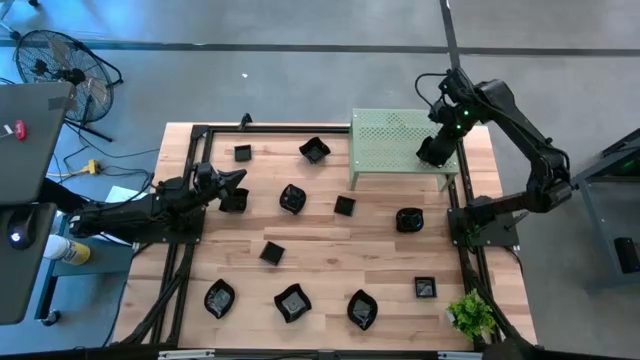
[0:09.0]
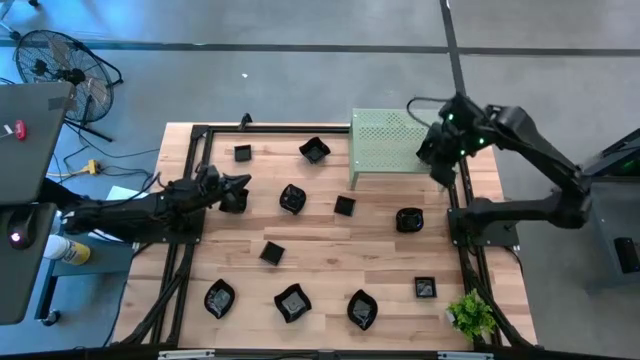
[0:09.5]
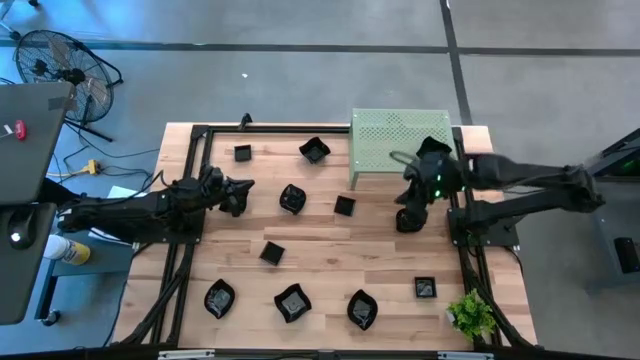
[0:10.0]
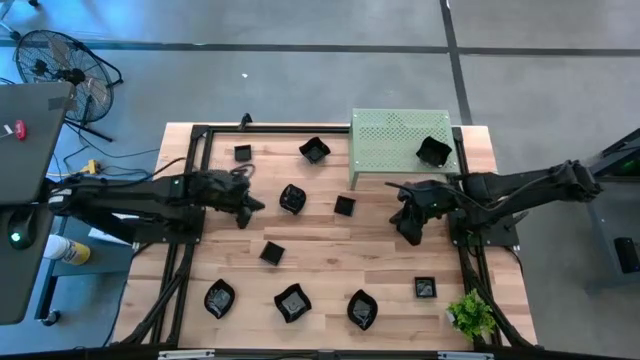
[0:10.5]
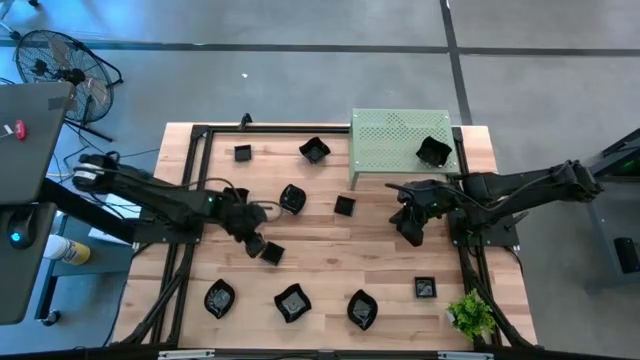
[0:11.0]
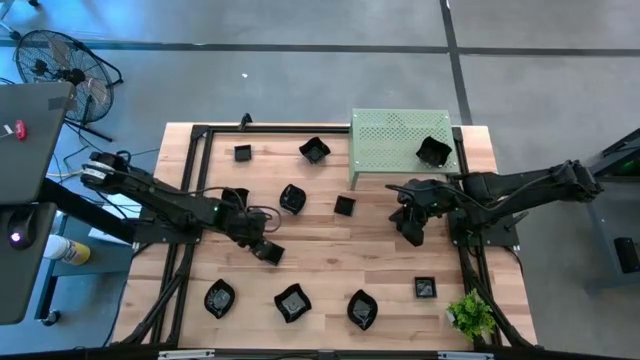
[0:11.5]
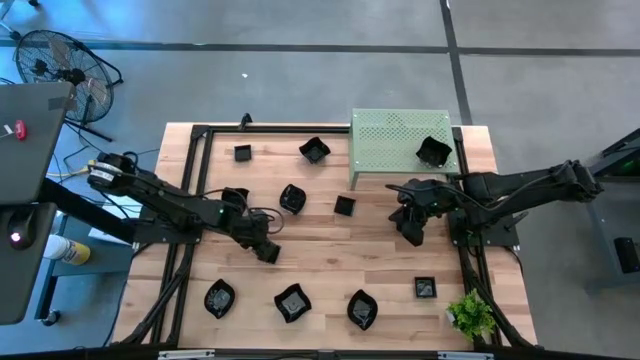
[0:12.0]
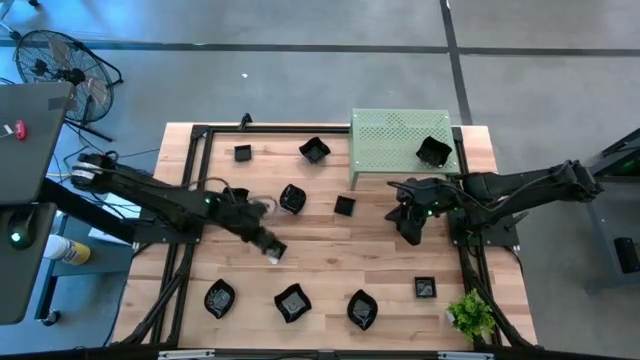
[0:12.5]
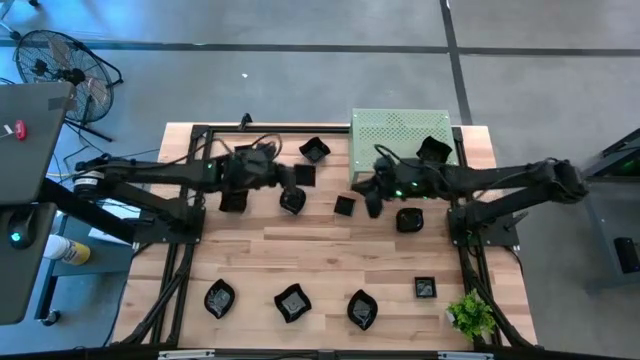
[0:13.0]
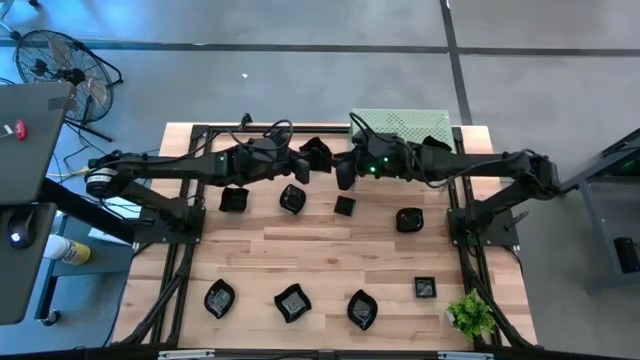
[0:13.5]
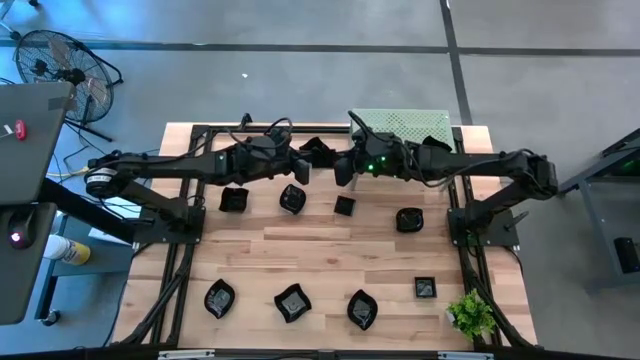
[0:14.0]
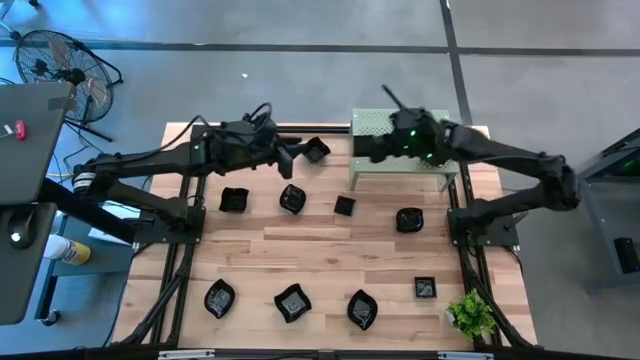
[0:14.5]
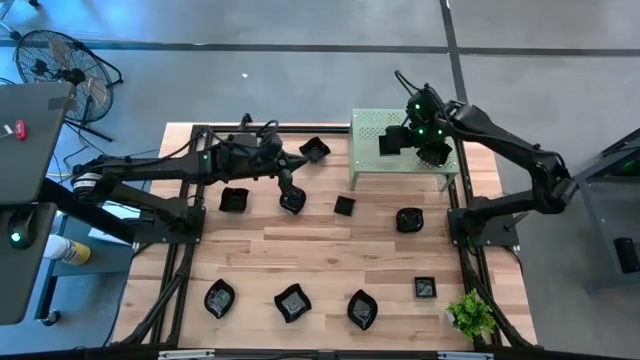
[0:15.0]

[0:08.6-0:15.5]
Task: Pick & Place Mini shaped plates
Put the black square plate on the shelf

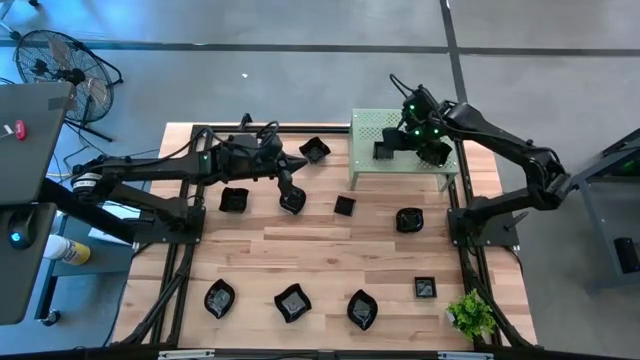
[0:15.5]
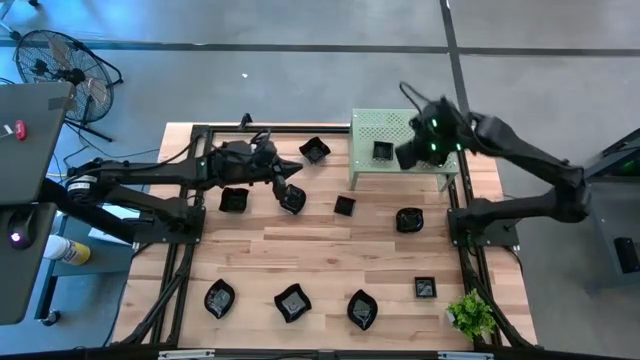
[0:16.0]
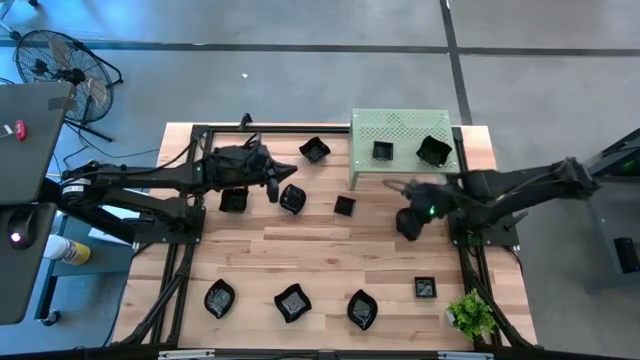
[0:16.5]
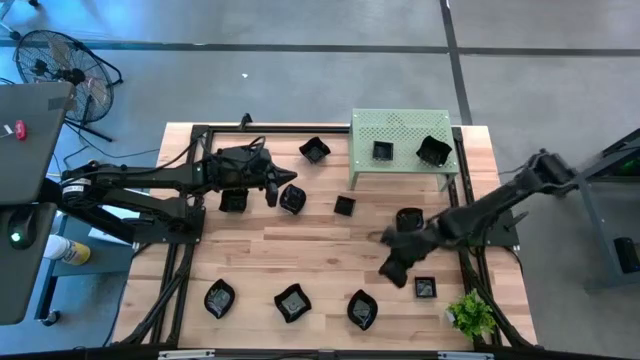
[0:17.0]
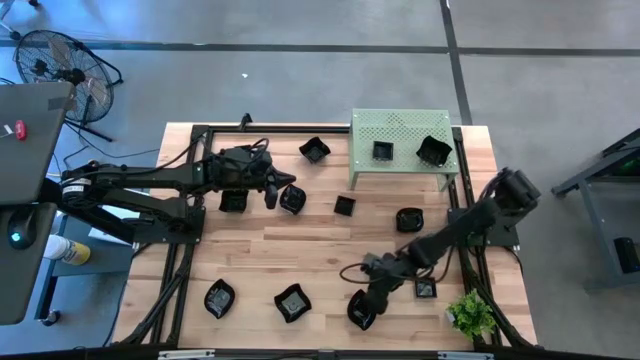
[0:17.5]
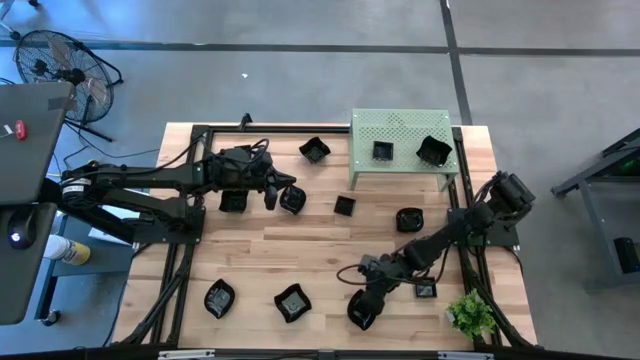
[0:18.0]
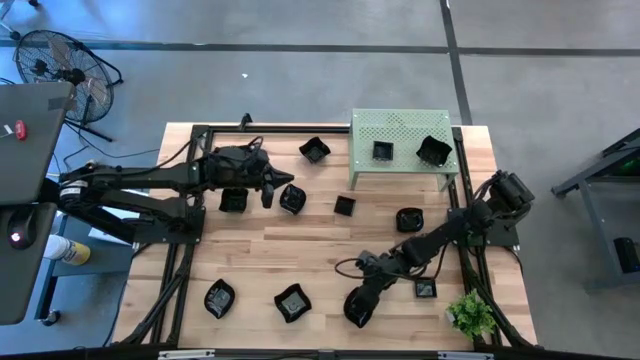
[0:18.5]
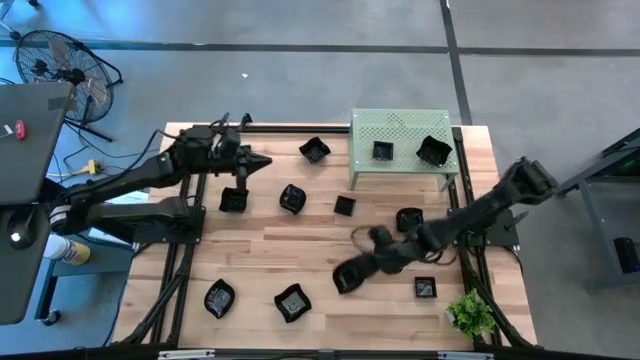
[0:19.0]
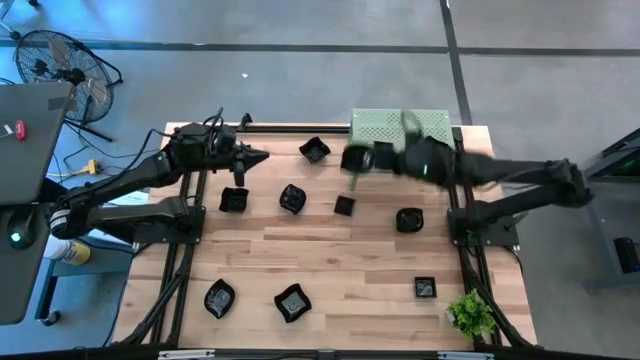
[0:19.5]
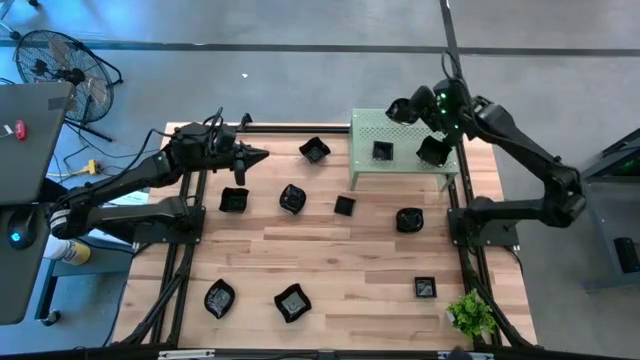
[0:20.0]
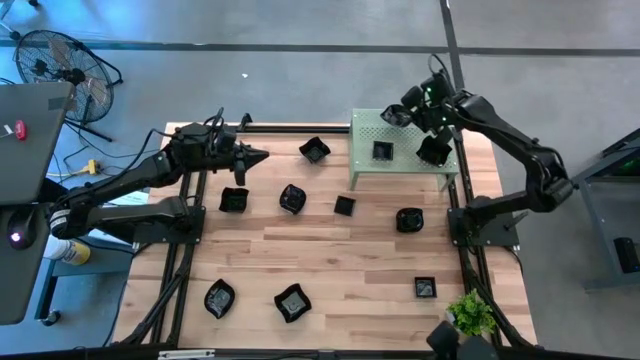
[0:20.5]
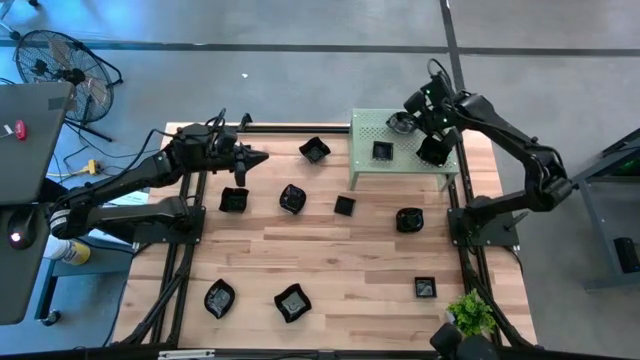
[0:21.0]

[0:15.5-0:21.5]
Put the black leaf-shaped plate on the shelf

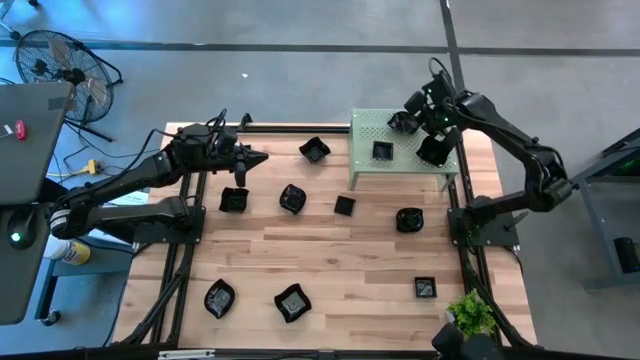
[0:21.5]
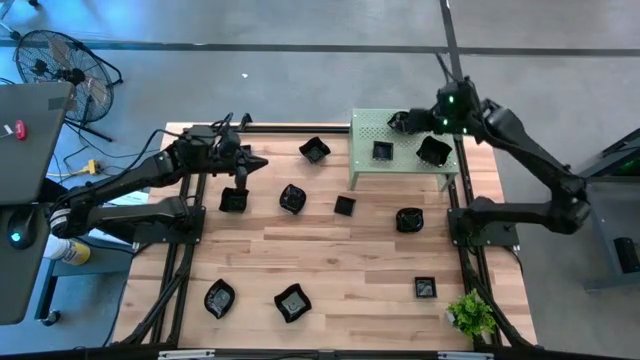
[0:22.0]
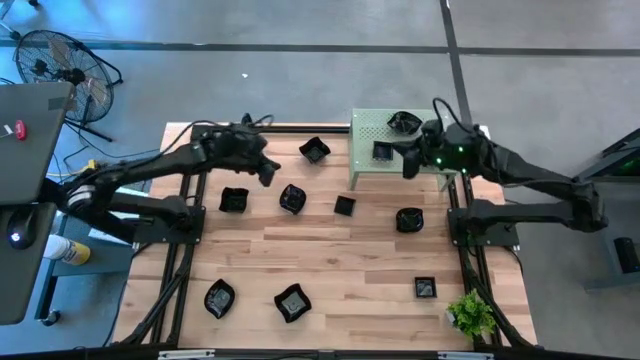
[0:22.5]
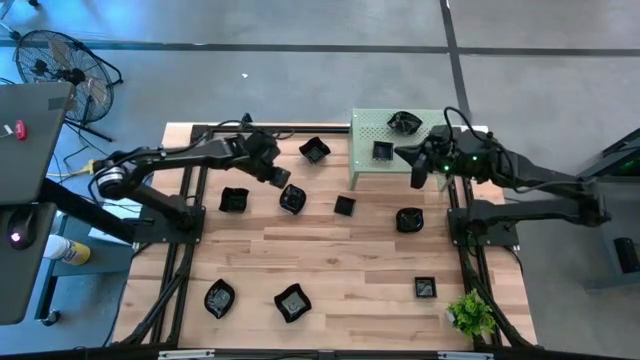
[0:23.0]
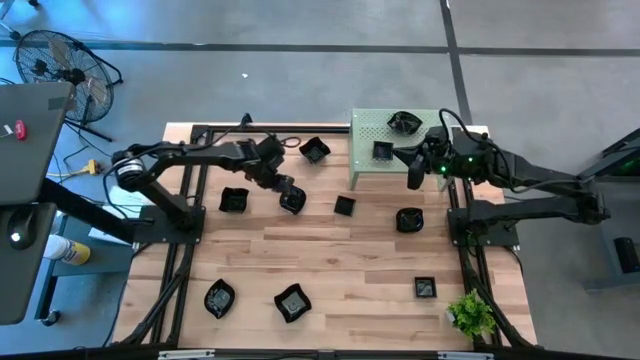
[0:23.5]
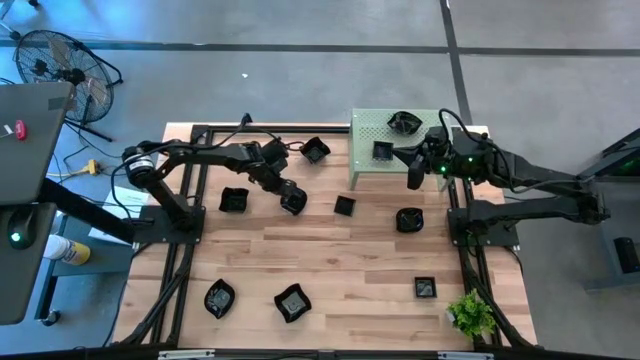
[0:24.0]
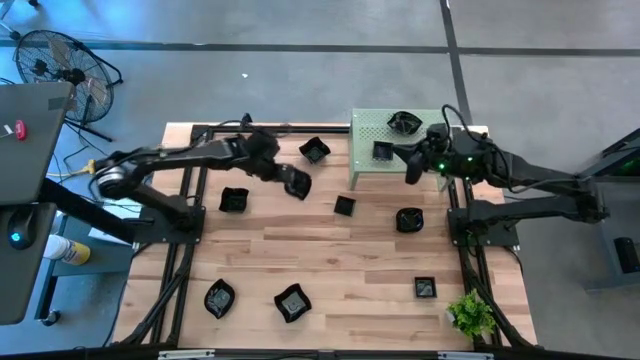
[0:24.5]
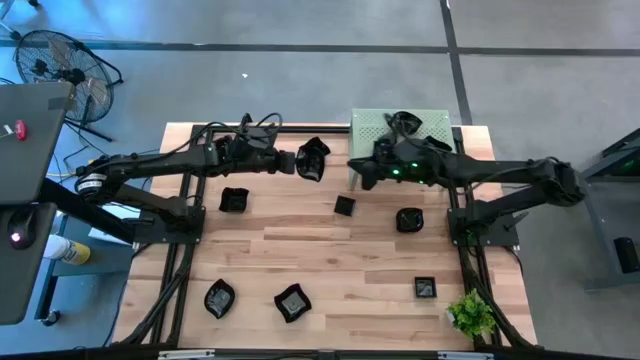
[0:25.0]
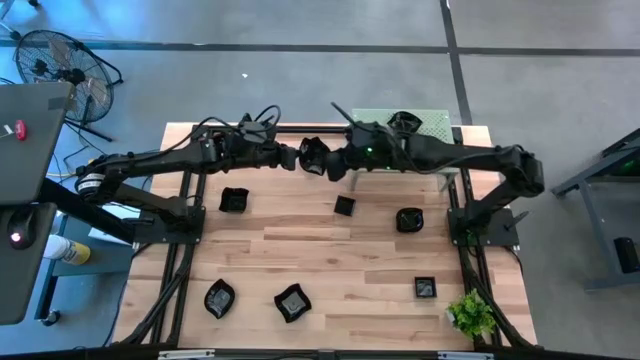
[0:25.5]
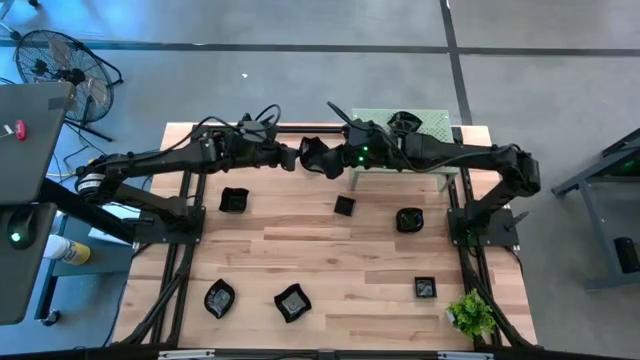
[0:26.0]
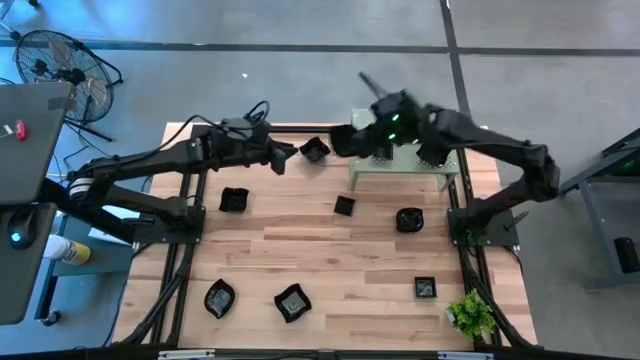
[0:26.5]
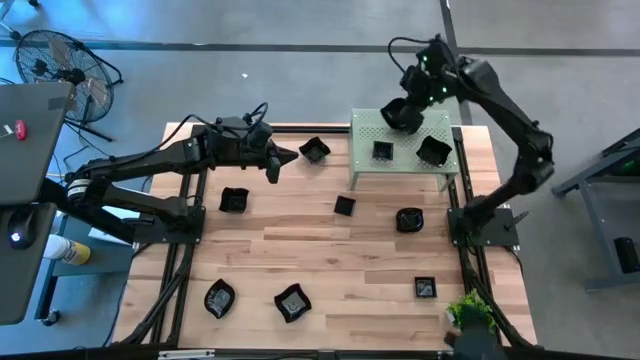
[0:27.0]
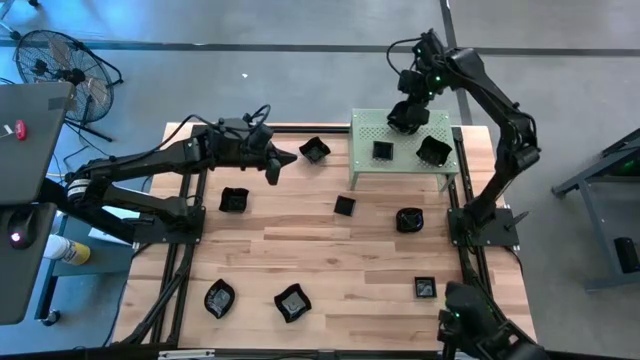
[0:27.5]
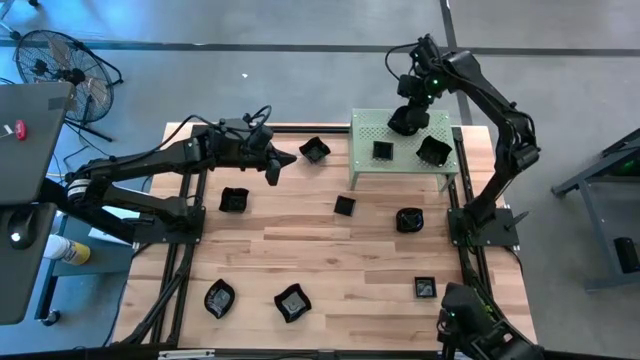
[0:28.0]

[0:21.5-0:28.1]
Stack the black leaf-shaped plate on top of the black leaf-shaped plate on the shelf
